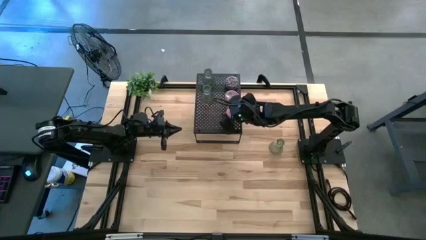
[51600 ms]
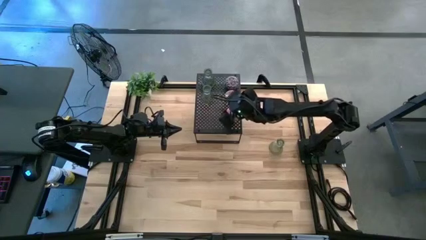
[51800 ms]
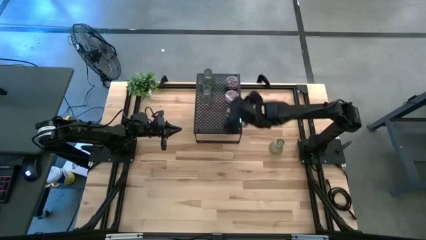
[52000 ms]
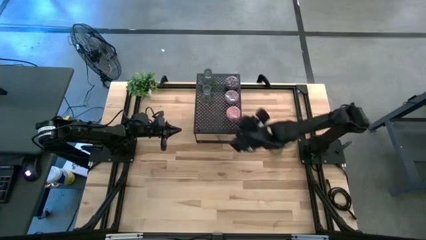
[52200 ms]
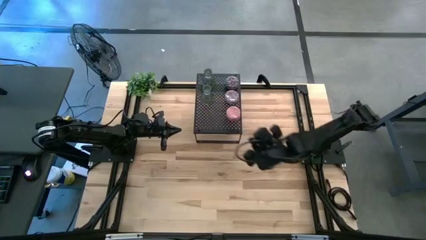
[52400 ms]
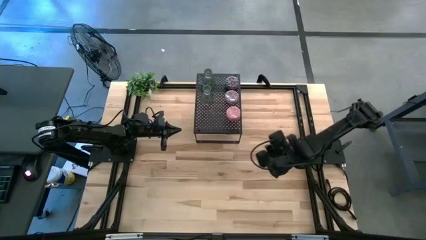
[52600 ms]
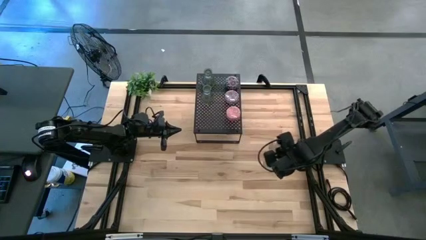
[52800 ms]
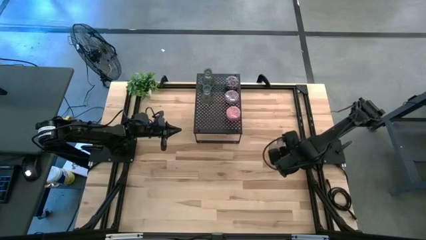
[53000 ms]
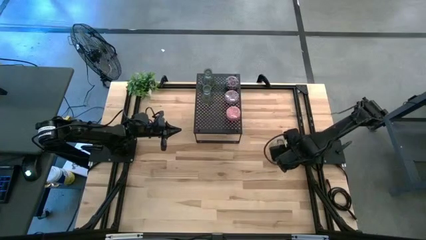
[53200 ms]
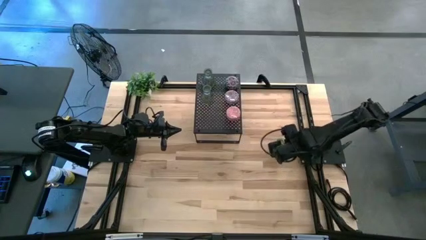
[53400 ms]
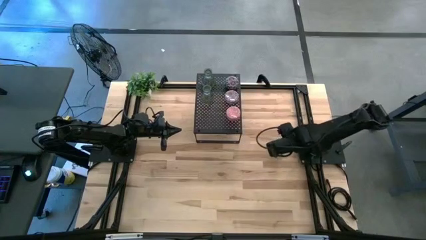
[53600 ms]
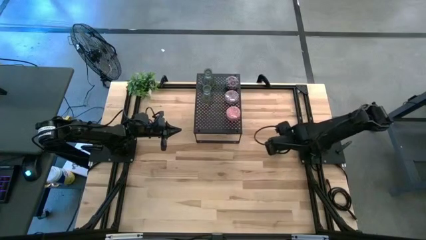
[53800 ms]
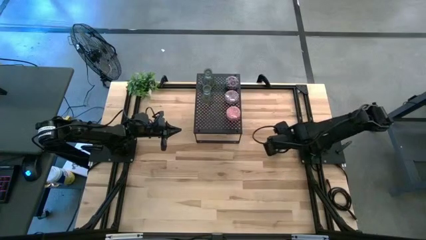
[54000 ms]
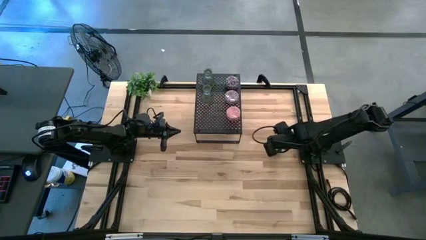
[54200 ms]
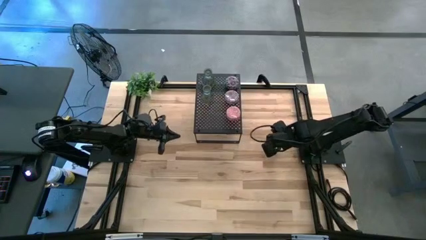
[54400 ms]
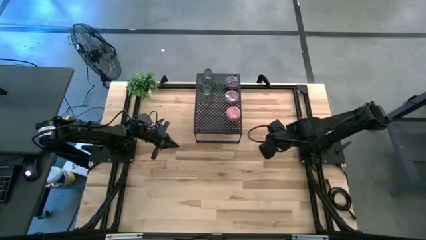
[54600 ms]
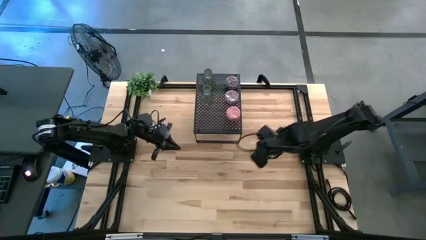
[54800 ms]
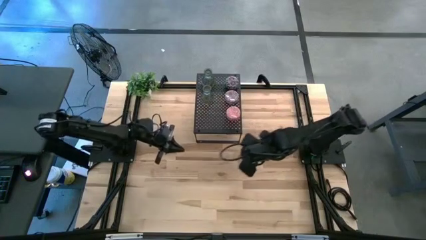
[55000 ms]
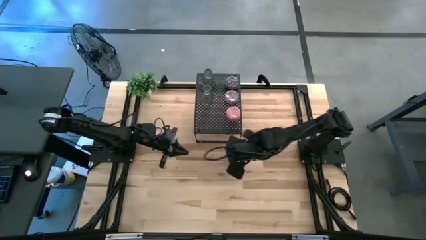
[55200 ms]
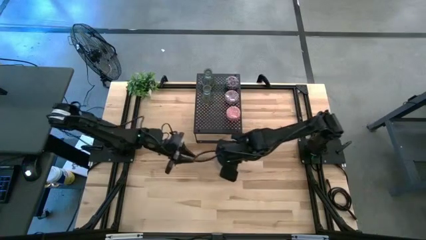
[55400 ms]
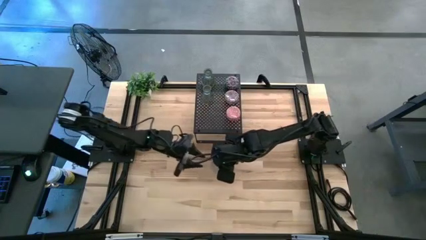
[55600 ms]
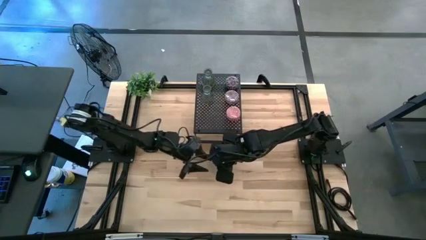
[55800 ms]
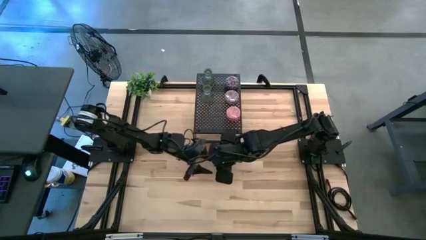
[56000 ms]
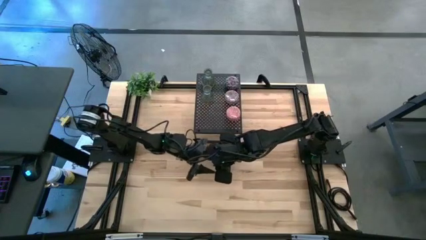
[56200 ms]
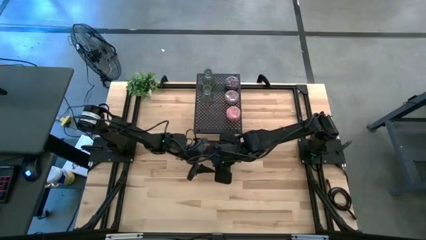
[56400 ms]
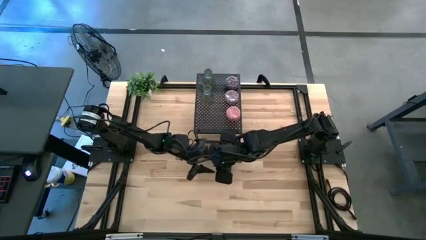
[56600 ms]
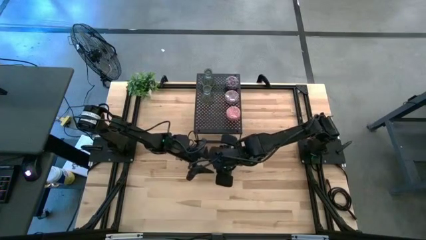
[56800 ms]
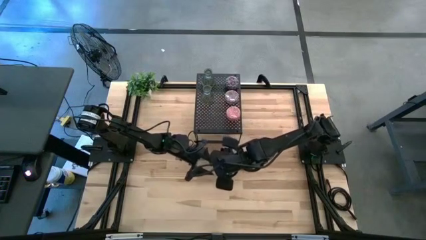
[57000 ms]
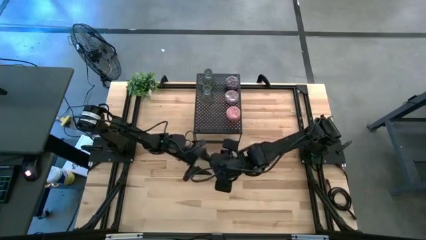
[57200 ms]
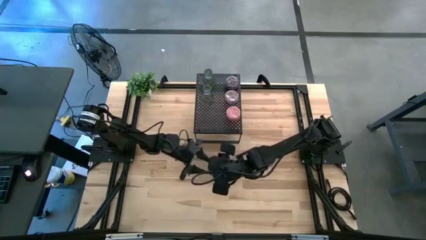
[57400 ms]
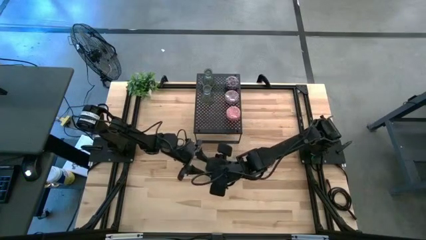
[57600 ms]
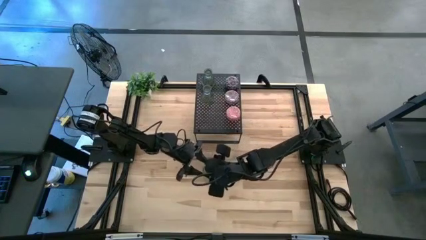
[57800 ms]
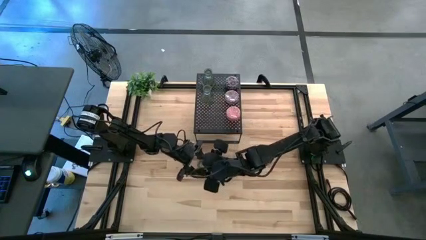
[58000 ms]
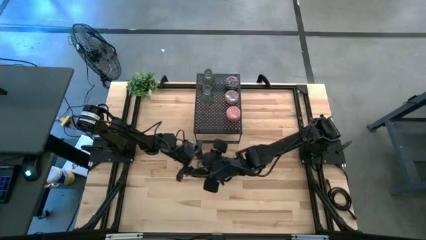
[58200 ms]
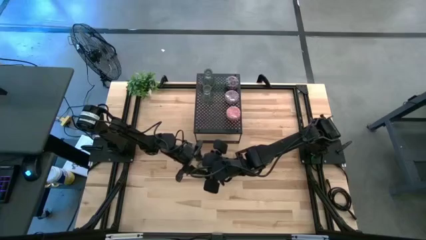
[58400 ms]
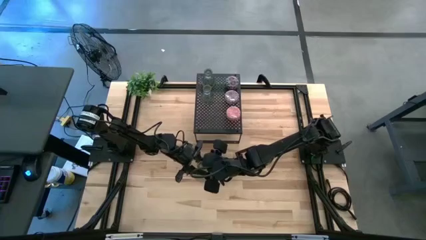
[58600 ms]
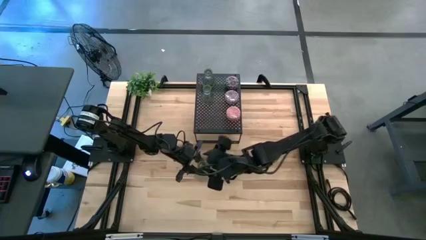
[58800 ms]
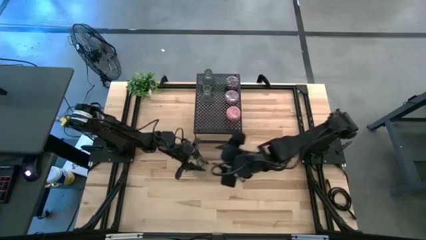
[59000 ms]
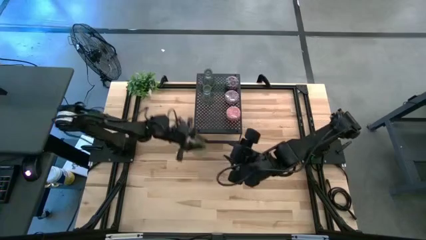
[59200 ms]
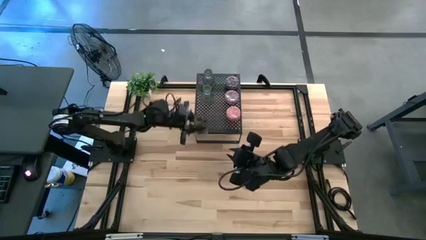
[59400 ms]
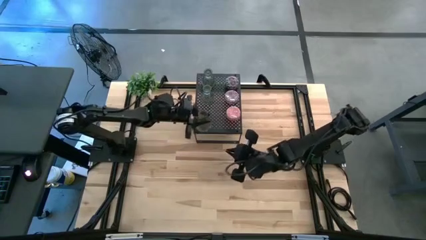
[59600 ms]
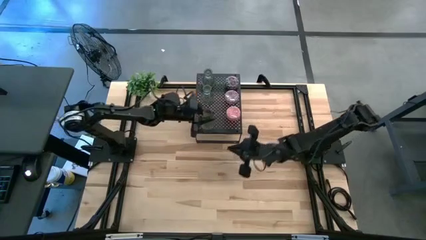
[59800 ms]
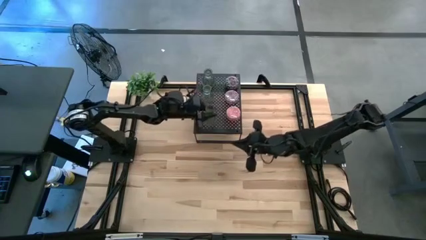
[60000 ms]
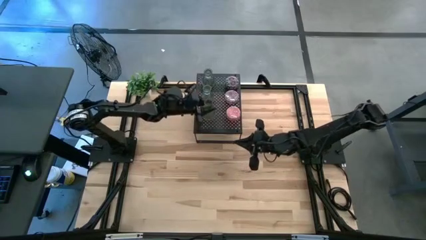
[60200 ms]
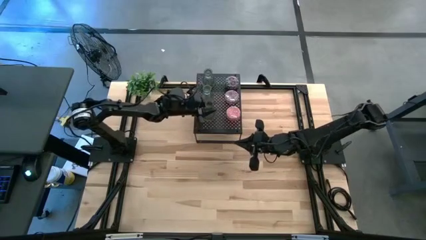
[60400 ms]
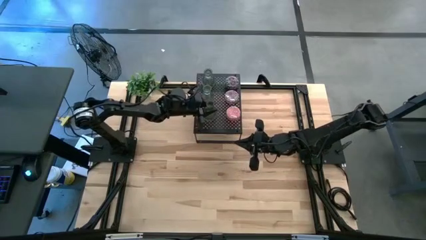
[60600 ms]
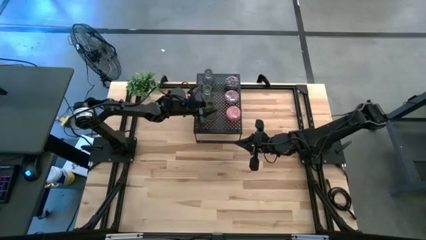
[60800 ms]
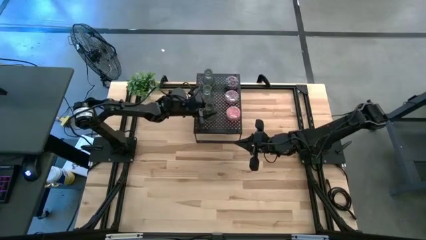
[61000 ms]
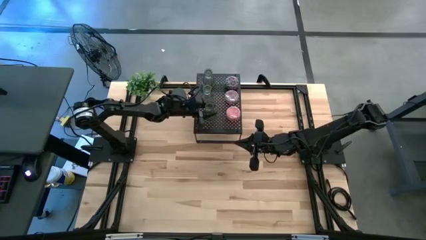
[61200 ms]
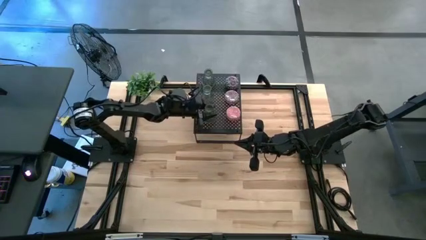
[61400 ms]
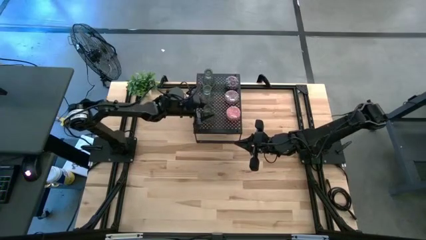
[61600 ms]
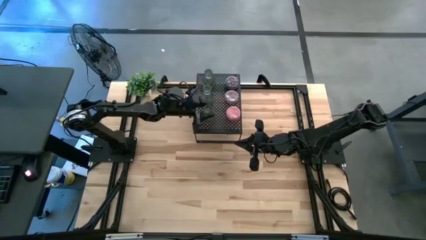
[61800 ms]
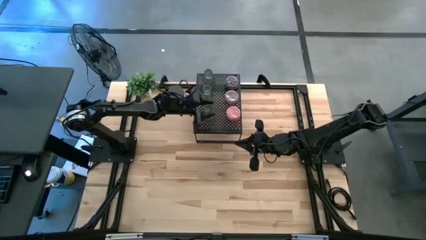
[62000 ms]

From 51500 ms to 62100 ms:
Task: Stock candles and vases on shelf
Put the green vase on the shelf aligned with the other green vases

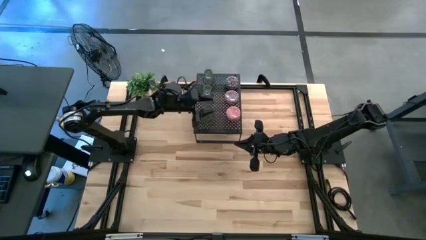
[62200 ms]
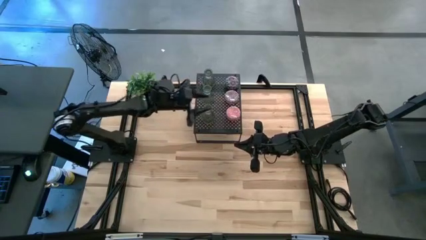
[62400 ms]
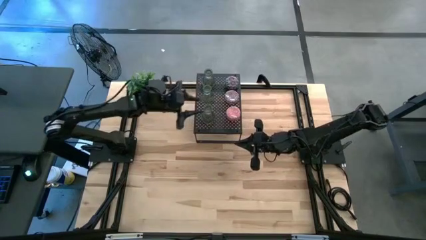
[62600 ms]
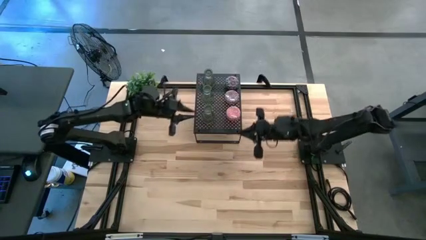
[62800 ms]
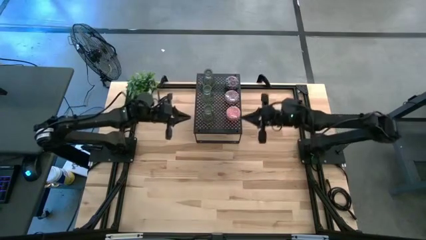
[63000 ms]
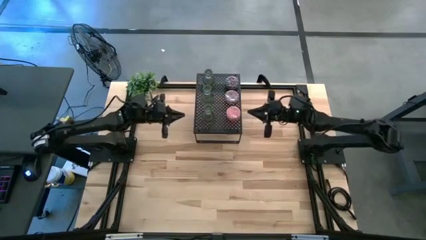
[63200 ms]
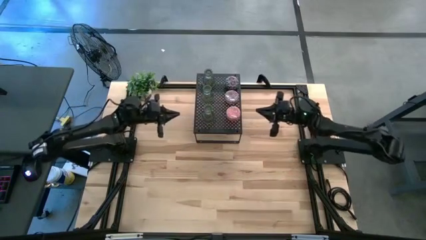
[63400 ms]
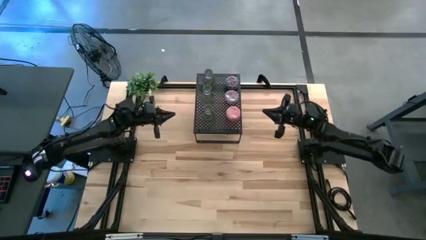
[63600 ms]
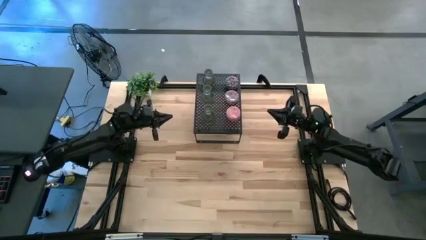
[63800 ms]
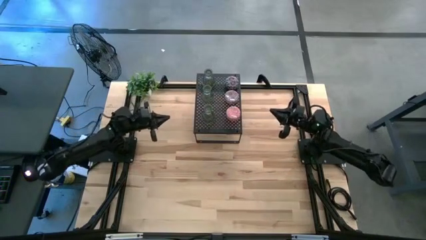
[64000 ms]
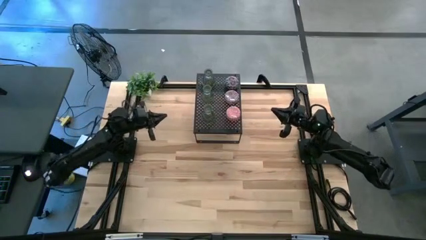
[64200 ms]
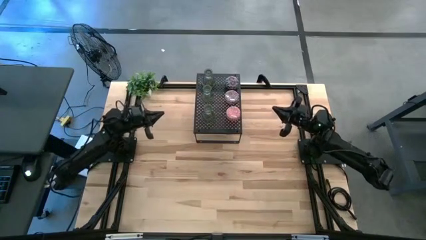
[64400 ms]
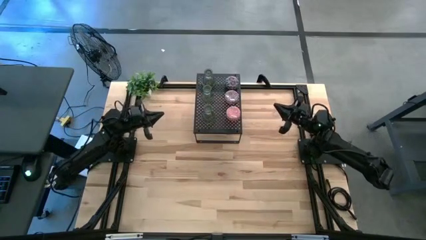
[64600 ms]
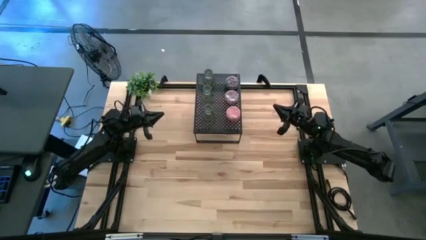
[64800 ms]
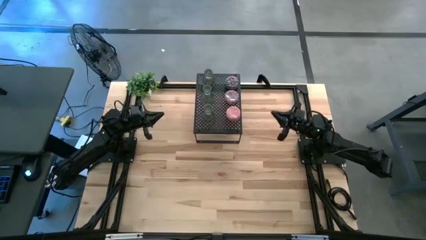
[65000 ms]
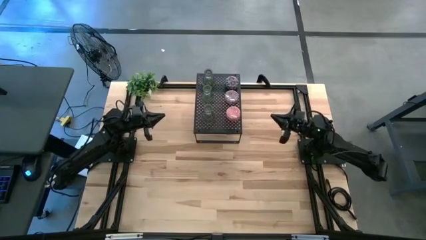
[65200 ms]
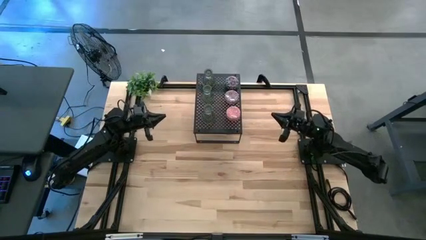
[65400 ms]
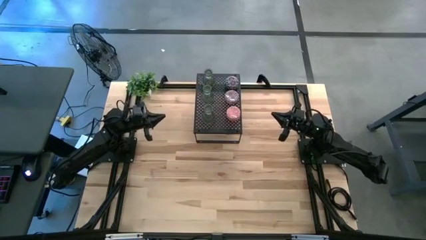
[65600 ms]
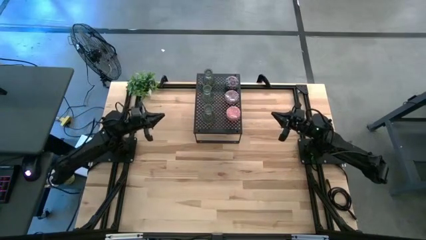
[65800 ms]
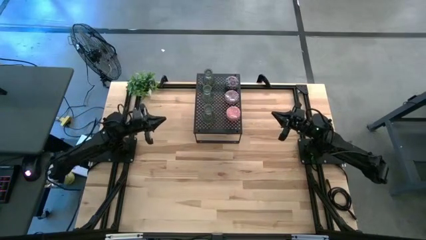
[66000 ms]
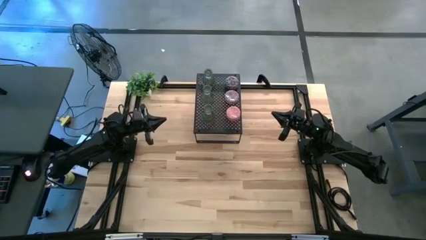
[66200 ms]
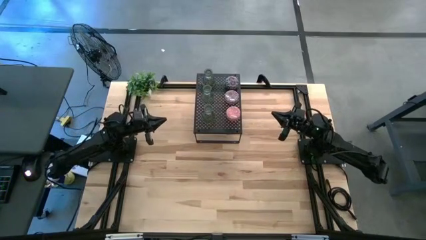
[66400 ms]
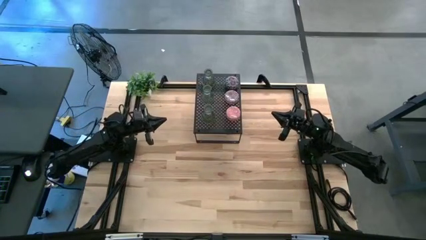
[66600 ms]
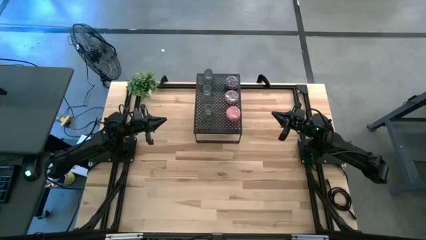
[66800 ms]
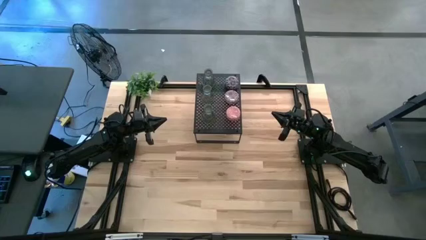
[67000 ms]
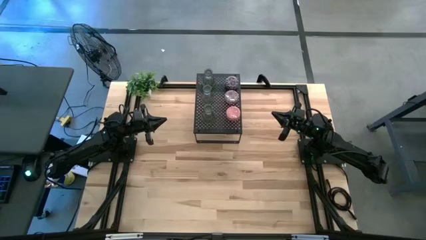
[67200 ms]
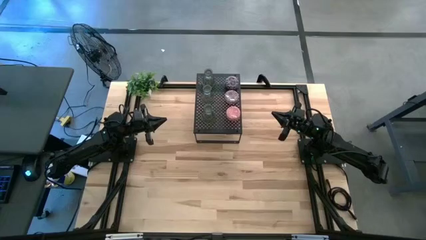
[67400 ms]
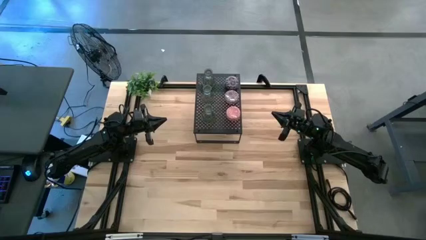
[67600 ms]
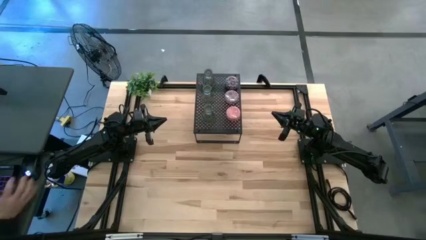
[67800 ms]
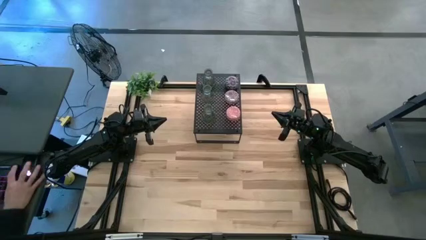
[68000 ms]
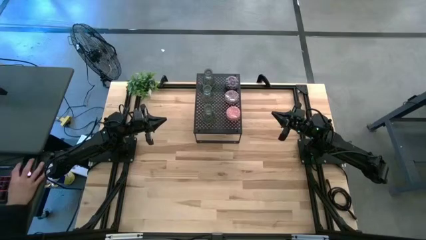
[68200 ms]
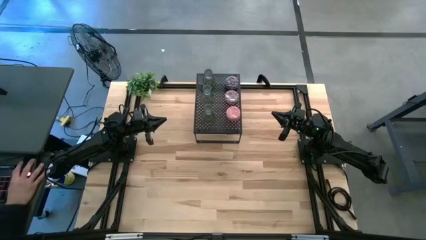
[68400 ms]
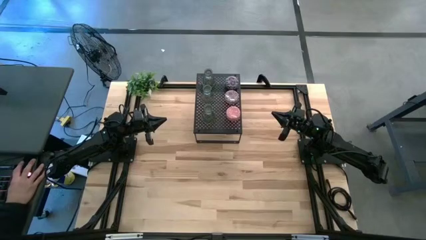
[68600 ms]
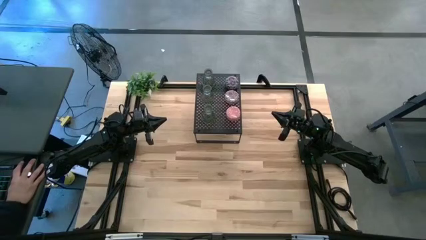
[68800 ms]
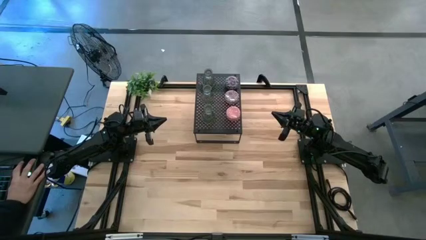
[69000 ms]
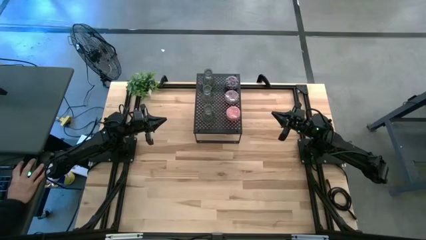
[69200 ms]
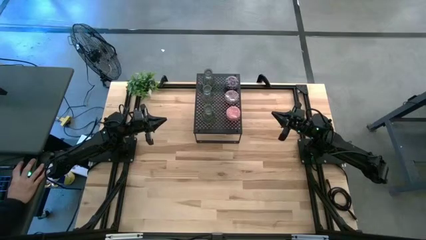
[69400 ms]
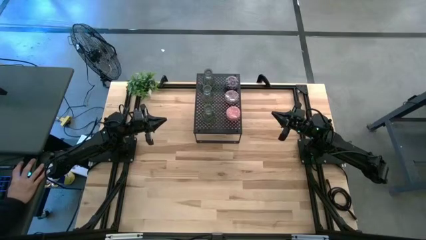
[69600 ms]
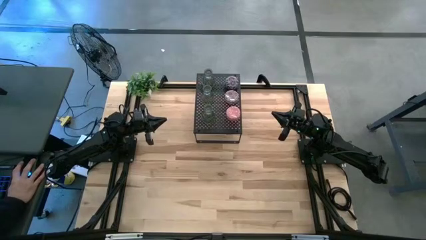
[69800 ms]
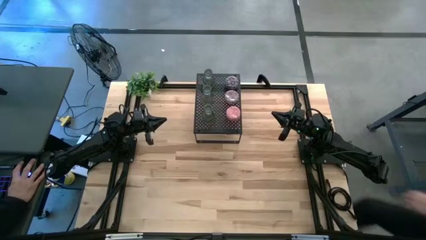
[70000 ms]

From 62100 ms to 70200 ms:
Return to Home Position
